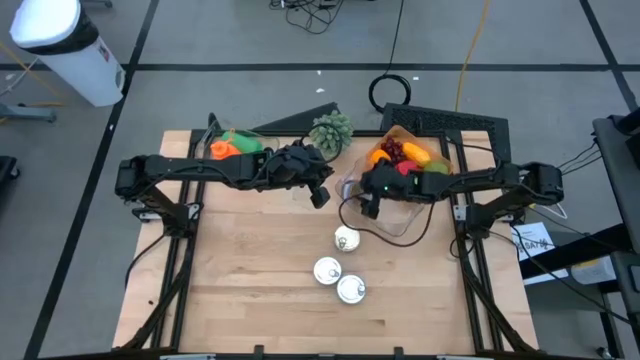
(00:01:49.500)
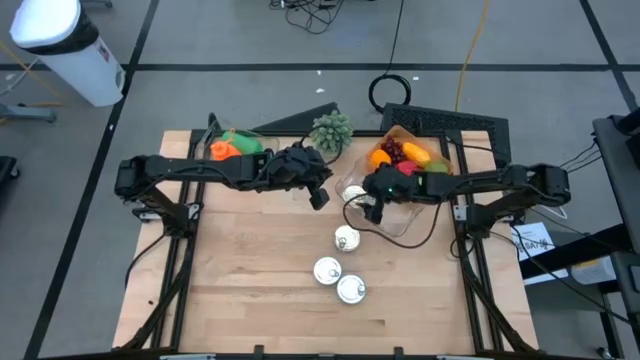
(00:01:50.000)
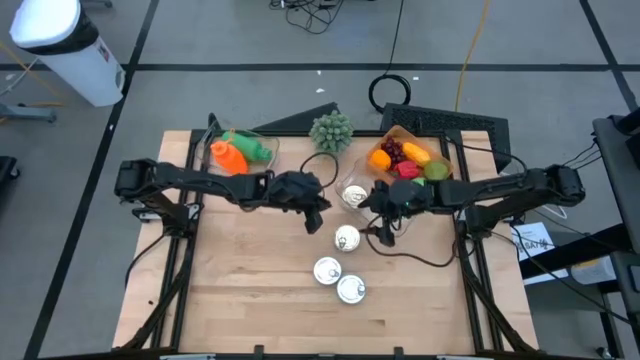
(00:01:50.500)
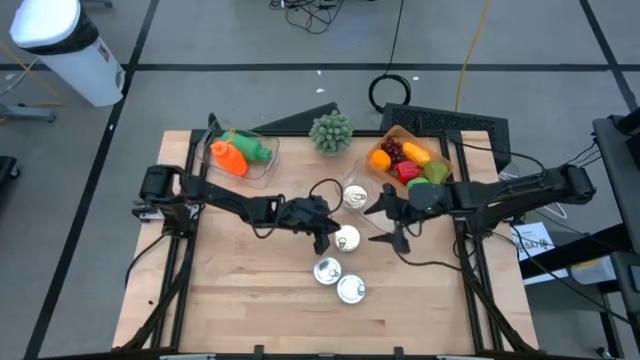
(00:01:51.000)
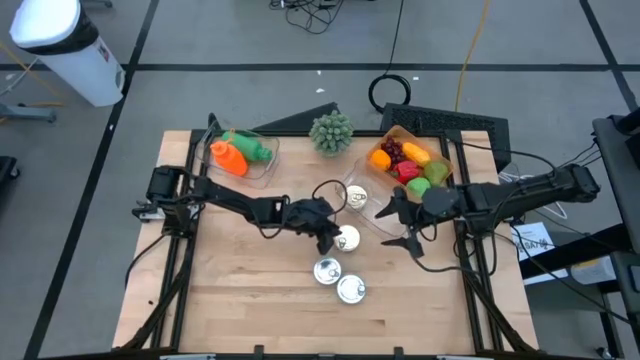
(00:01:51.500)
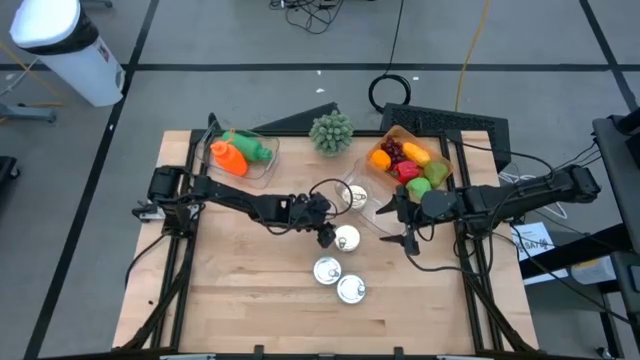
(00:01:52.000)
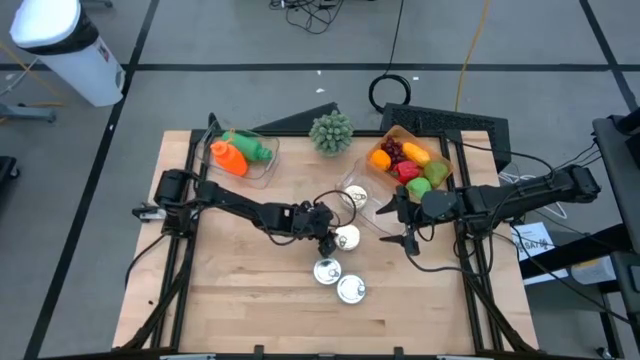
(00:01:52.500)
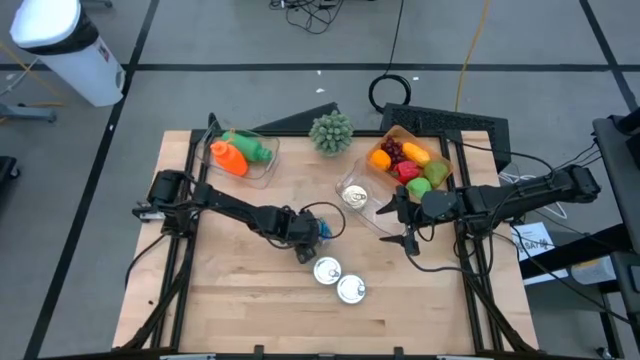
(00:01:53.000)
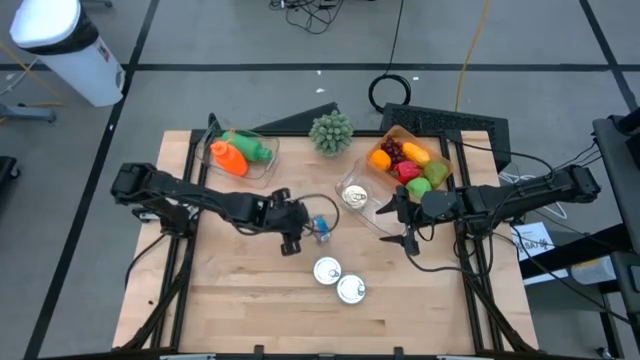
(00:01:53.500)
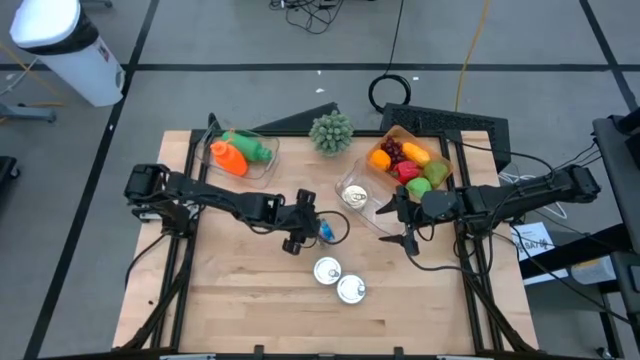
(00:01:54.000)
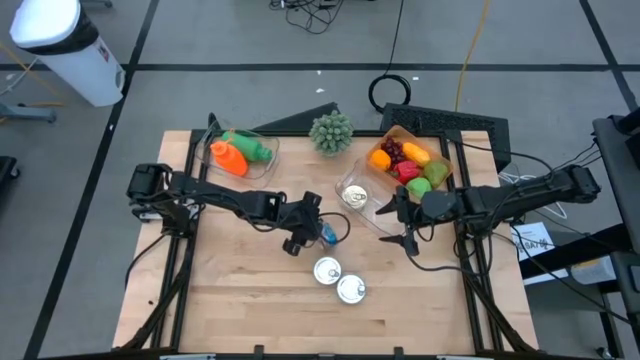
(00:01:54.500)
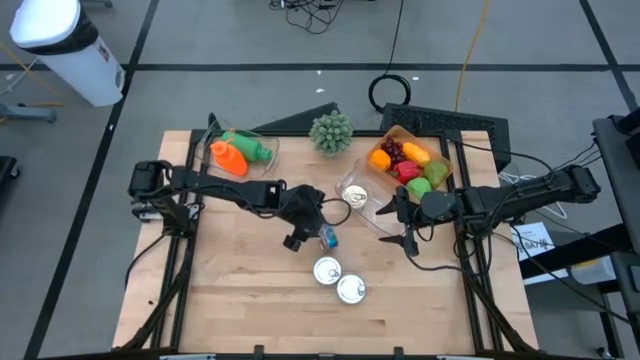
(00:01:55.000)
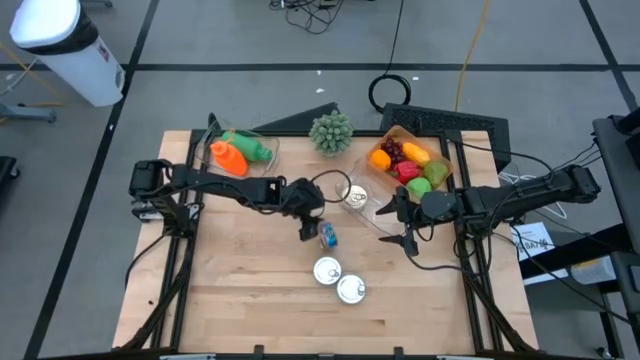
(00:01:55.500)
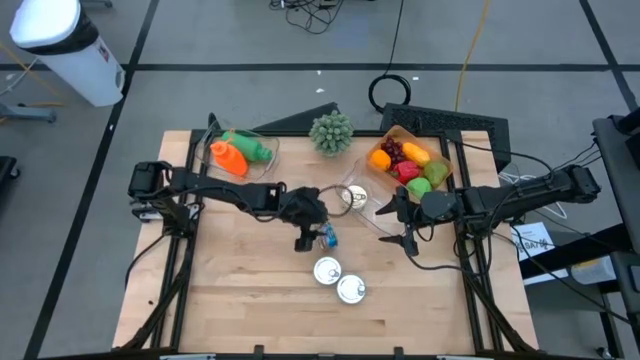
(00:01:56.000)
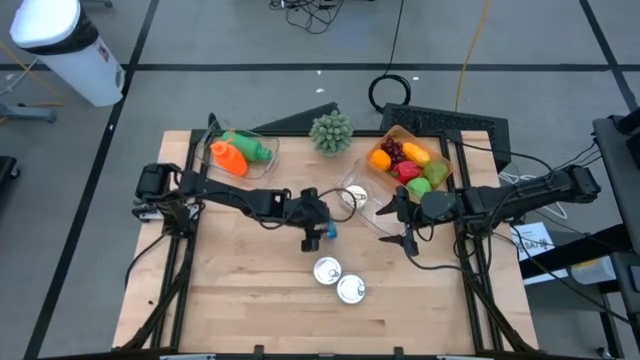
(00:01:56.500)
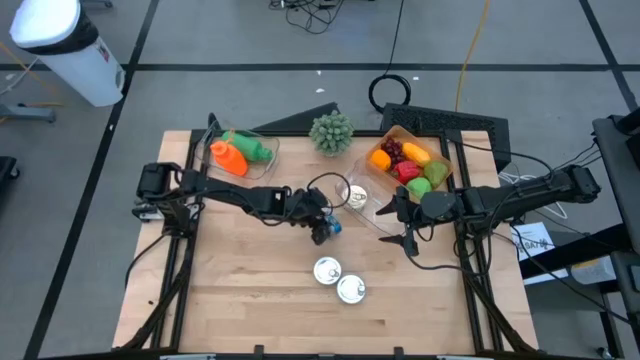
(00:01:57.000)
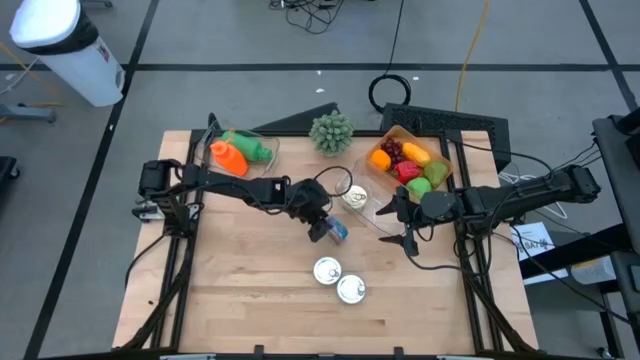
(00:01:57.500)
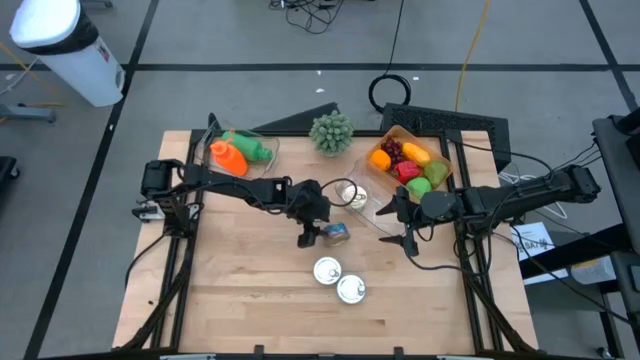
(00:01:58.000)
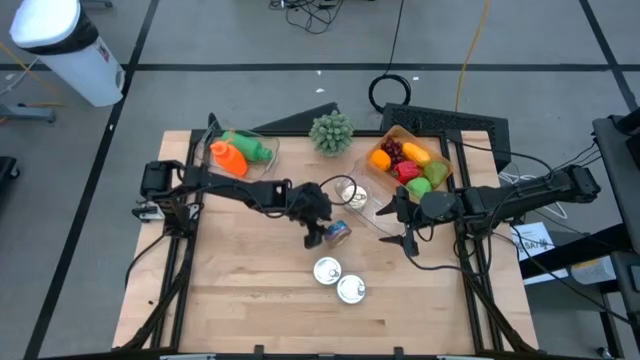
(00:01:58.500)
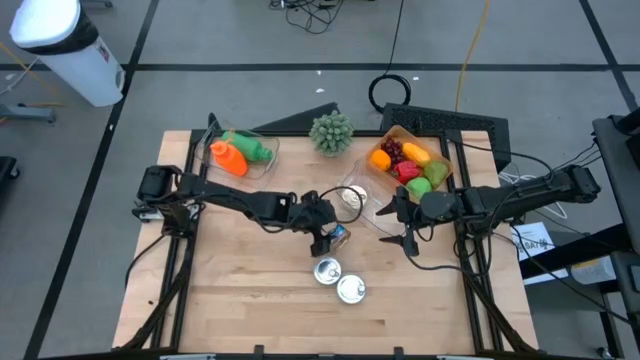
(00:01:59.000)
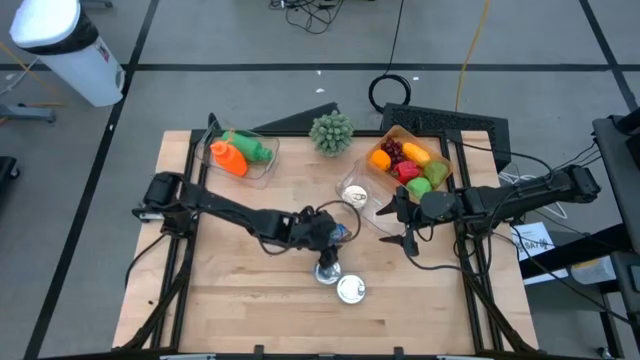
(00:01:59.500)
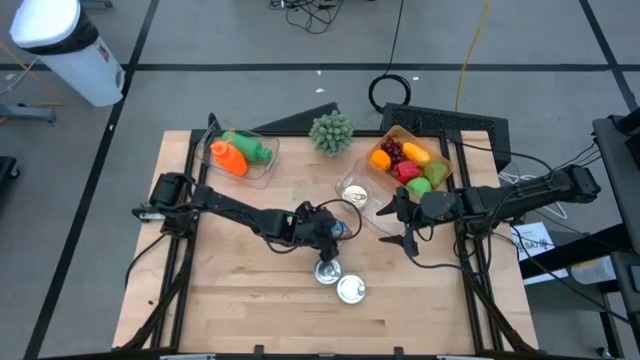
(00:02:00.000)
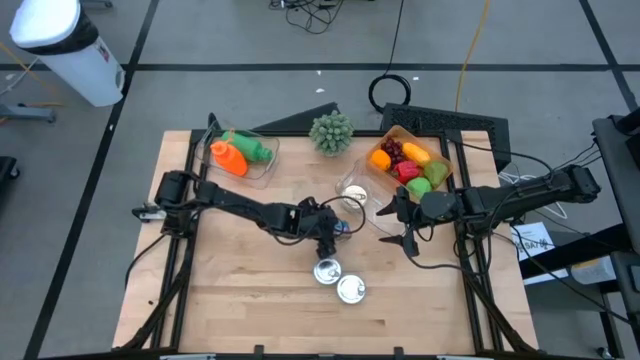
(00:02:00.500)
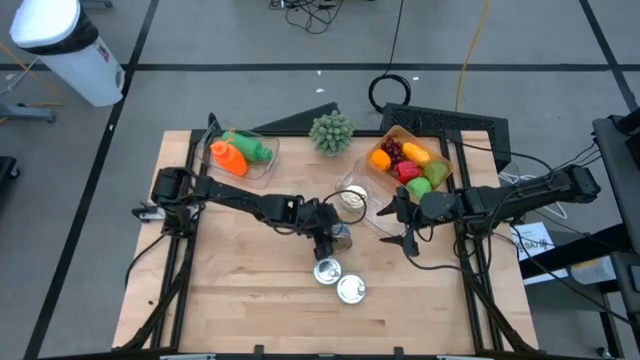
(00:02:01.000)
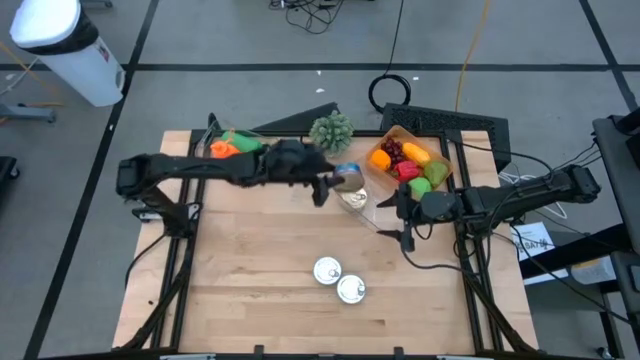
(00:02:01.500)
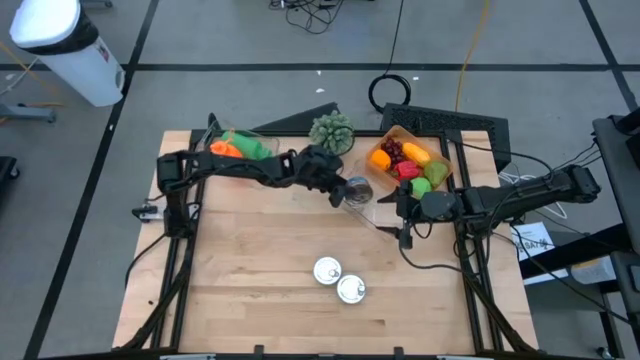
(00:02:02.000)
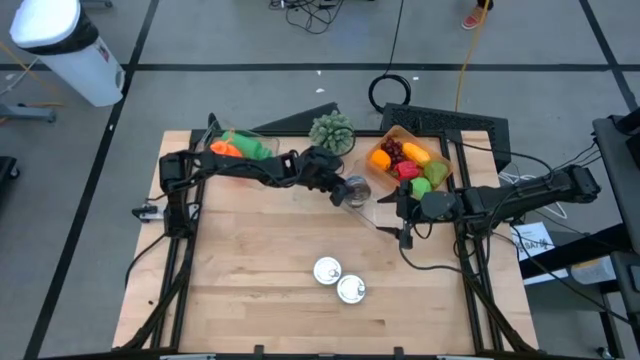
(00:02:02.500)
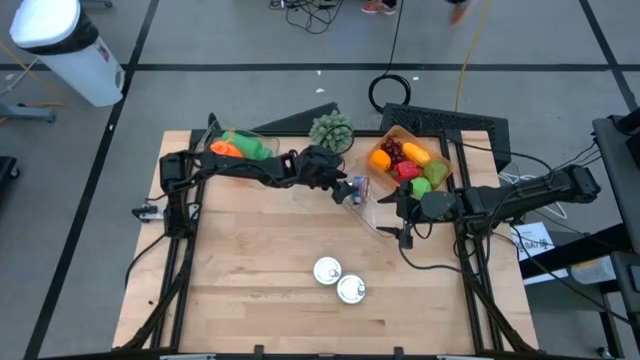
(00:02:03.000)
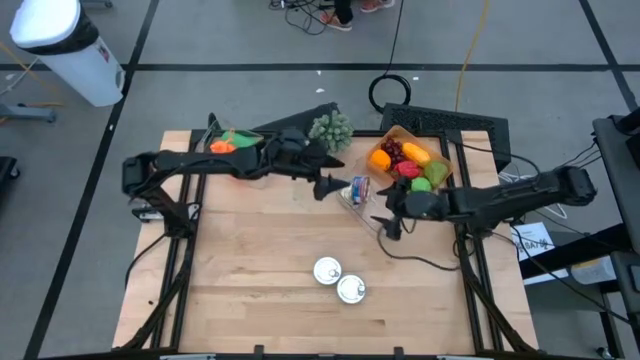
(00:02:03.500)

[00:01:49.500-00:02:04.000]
Task: Pick & Place Food Item
Put the blue and pink tuna can into the right transparent bin

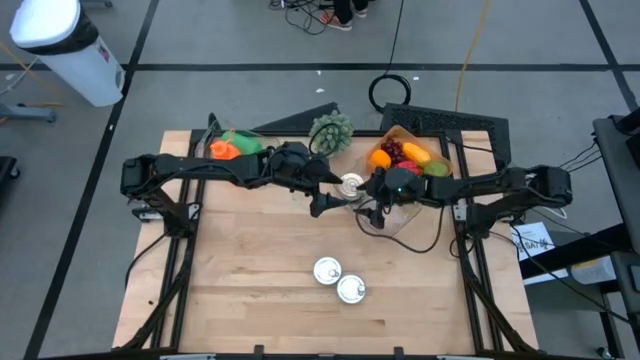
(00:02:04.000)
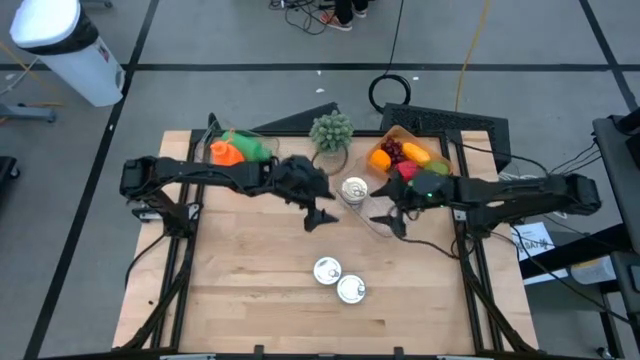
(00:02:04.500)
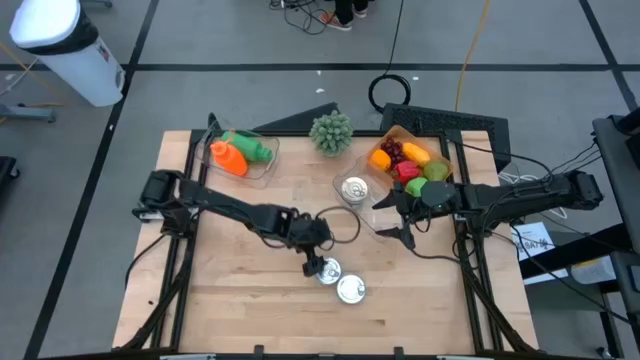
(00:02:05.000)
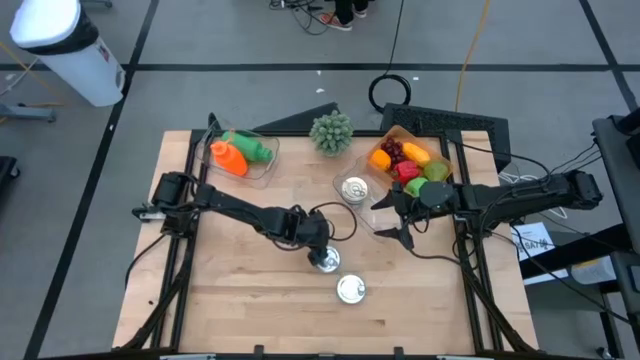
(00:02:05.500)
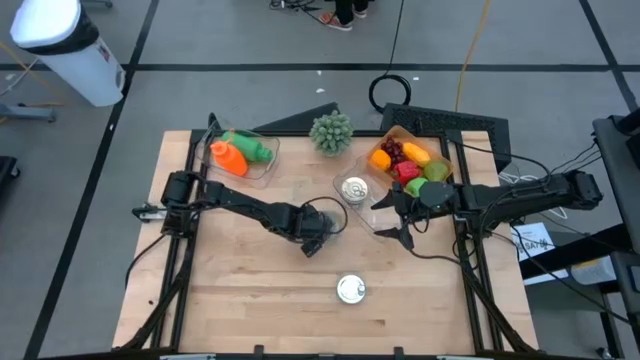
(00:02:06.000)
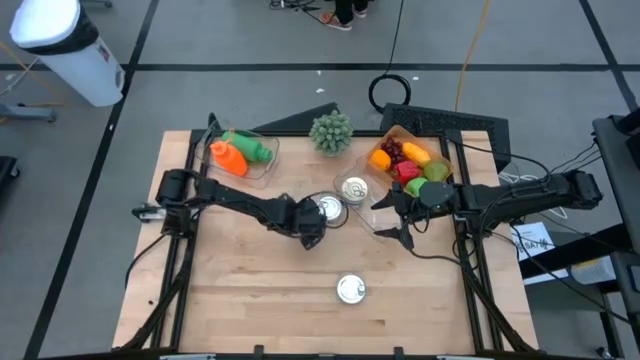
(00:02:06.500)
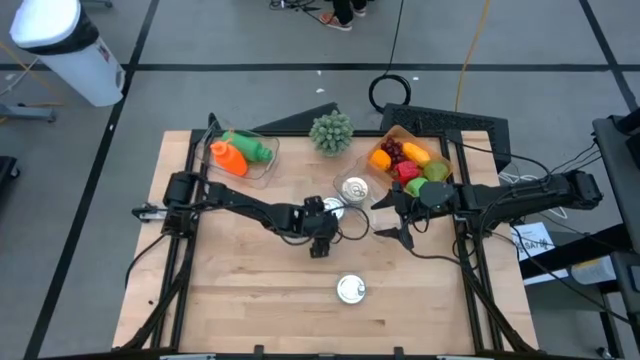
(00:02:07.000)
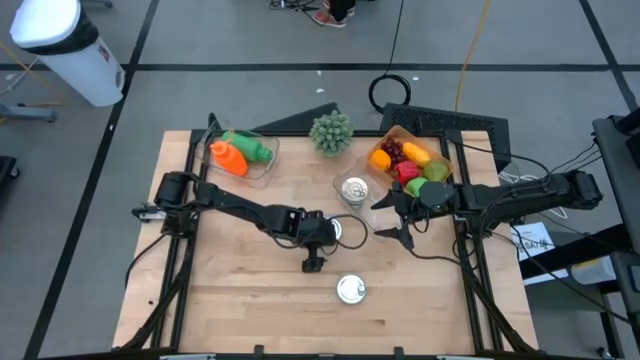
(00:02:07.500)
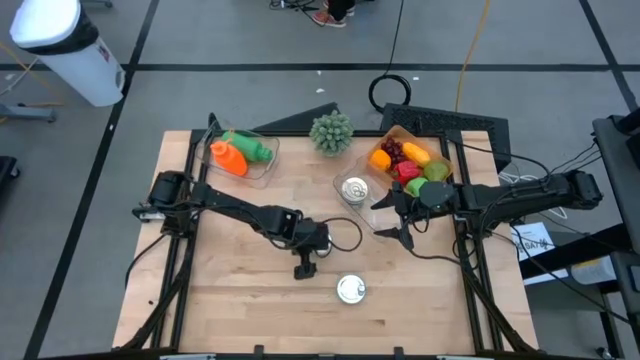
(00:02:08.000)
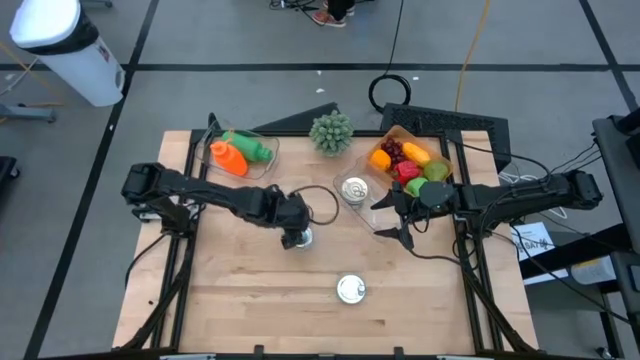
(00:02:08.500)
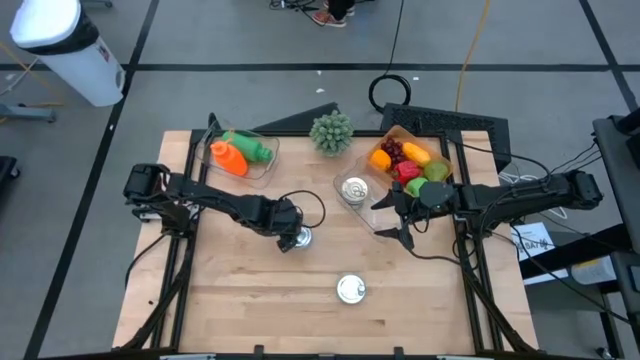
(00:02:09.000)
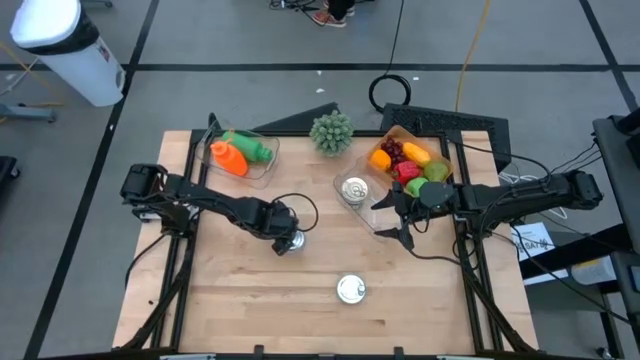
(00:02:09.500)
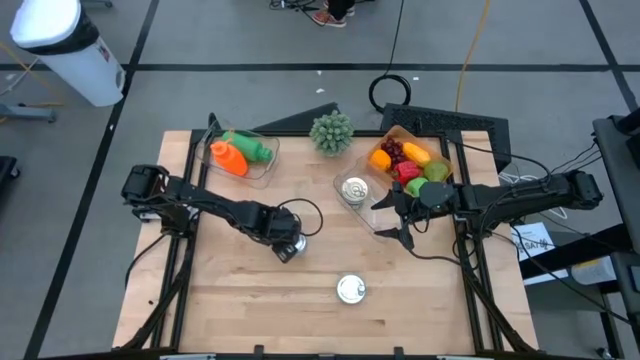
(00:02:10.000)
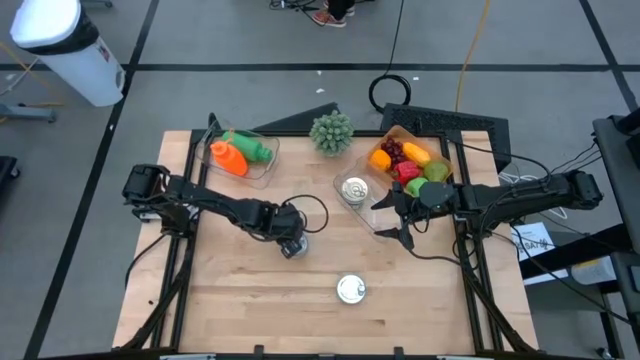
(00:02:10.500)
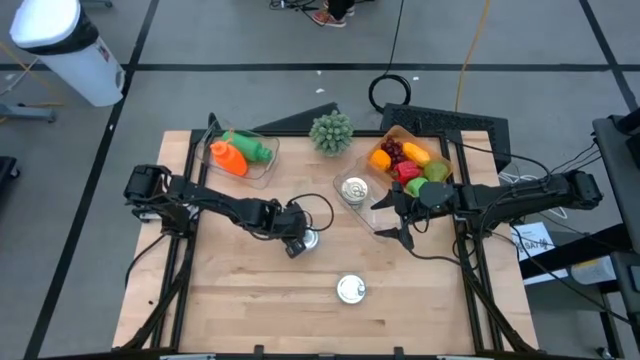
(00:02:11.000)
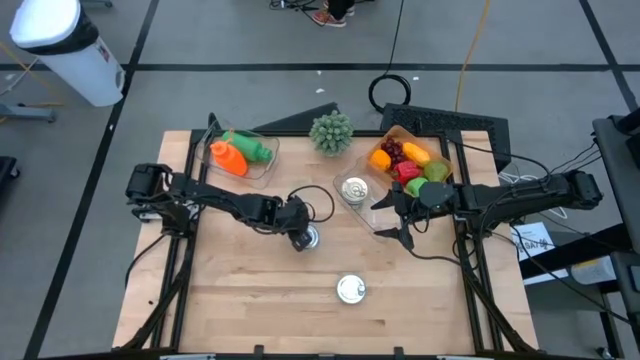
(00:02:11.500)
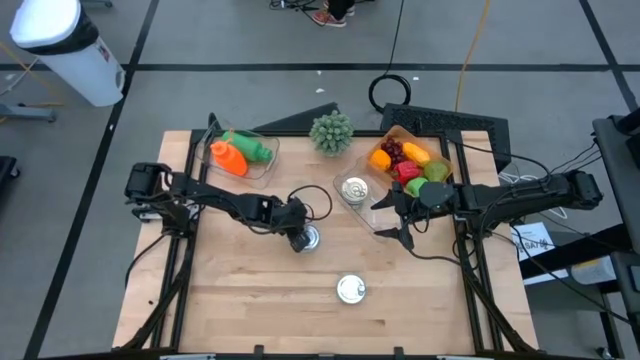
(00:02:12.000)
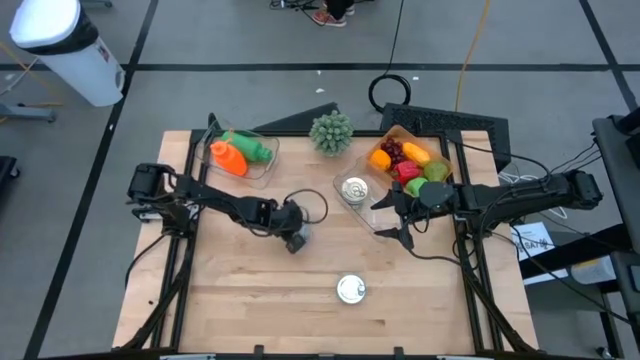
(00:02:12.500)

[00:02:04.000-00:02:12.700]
Put the left green tuna can into the right transparent bin
